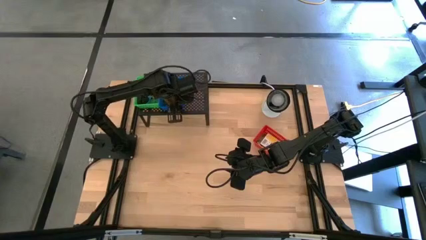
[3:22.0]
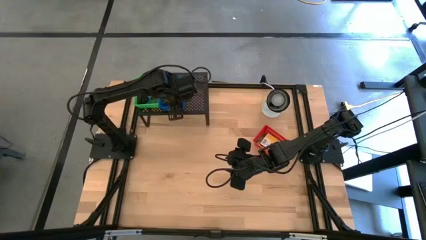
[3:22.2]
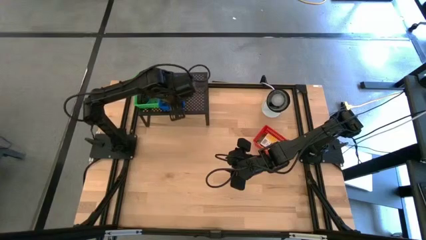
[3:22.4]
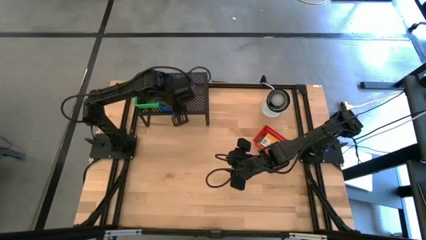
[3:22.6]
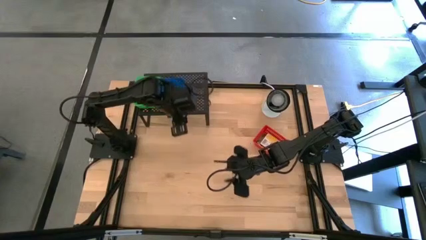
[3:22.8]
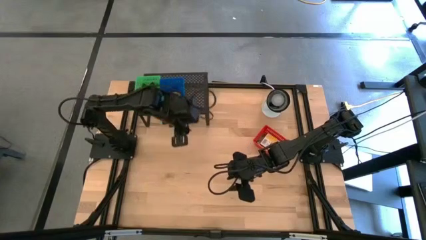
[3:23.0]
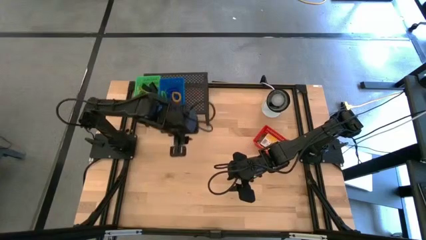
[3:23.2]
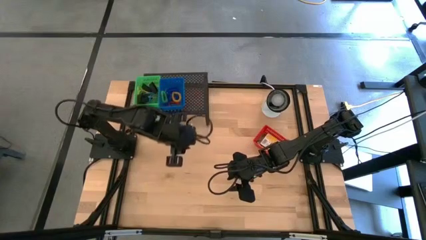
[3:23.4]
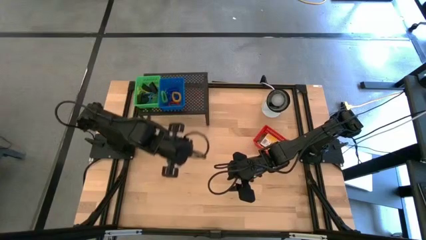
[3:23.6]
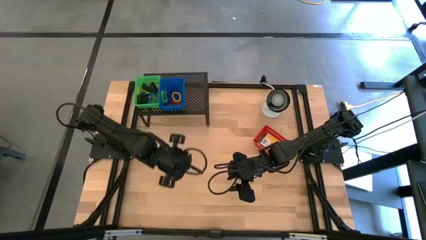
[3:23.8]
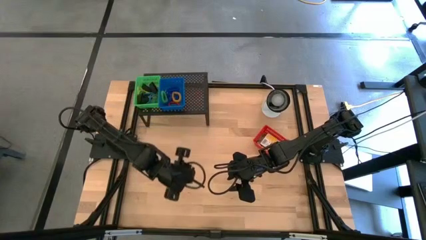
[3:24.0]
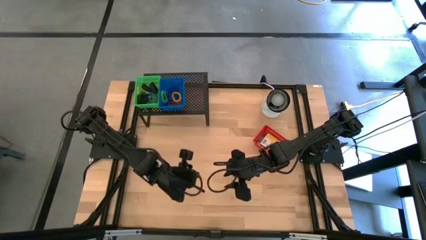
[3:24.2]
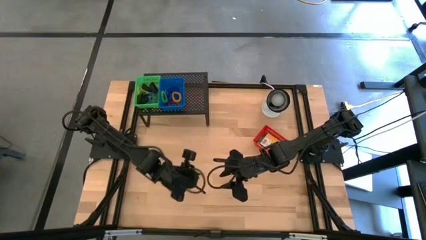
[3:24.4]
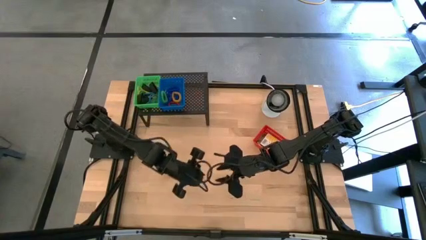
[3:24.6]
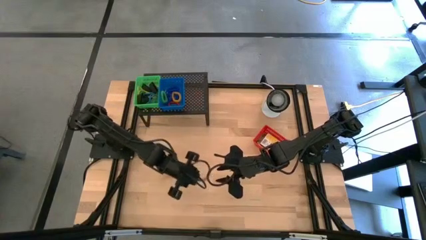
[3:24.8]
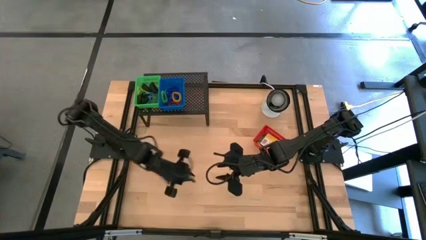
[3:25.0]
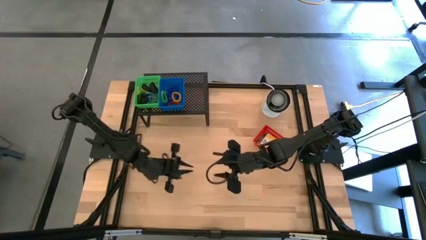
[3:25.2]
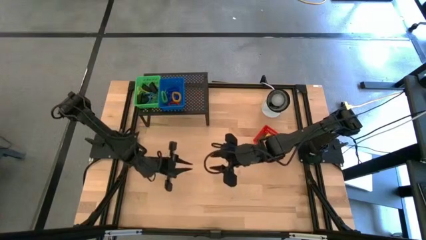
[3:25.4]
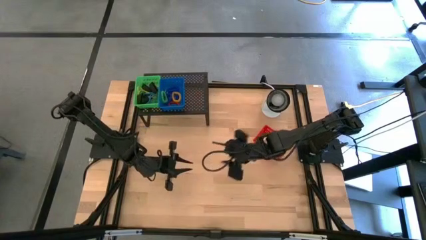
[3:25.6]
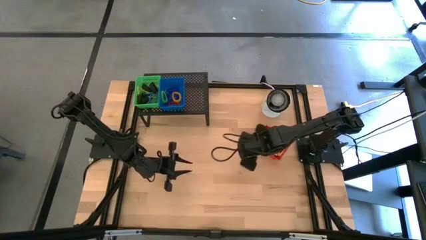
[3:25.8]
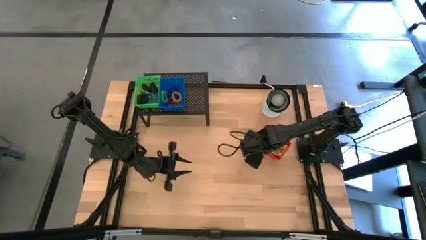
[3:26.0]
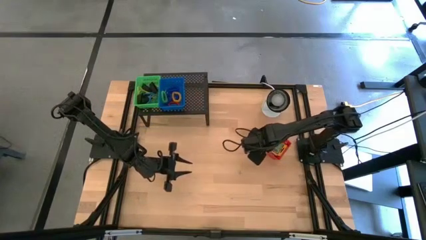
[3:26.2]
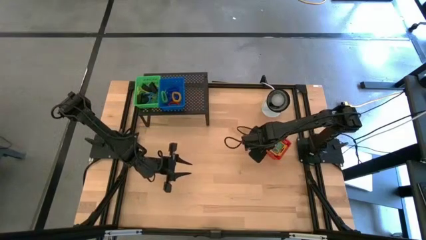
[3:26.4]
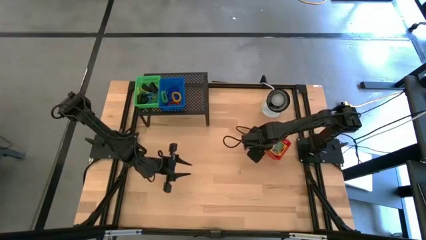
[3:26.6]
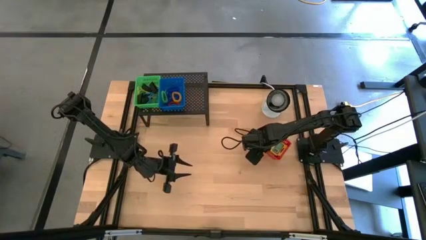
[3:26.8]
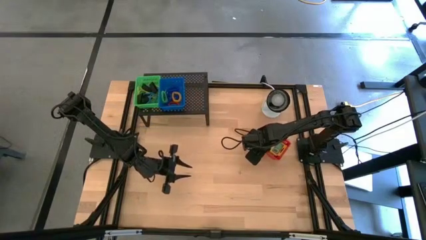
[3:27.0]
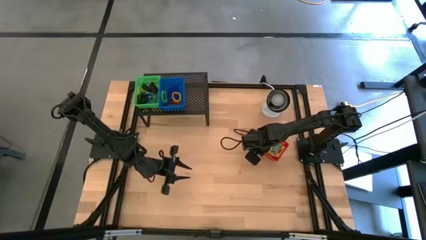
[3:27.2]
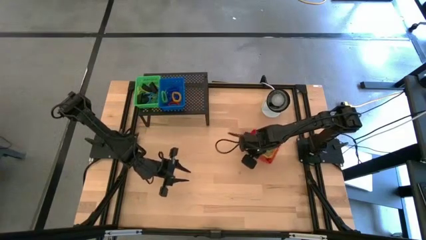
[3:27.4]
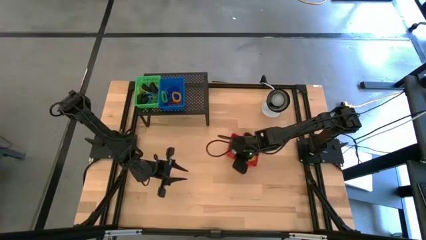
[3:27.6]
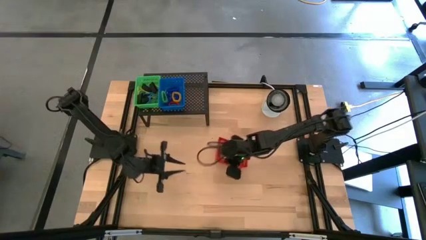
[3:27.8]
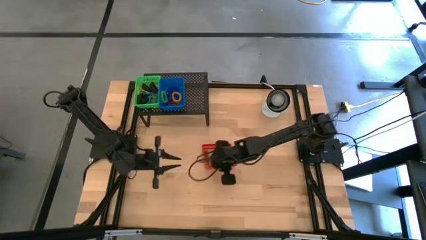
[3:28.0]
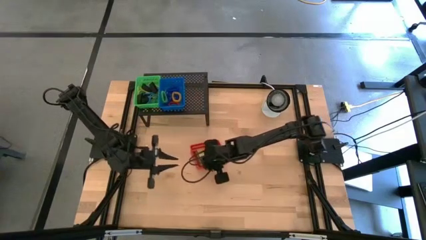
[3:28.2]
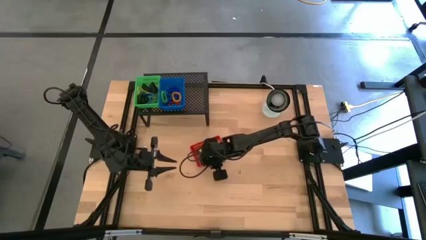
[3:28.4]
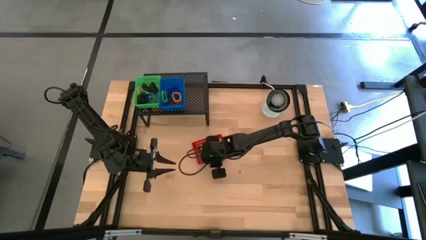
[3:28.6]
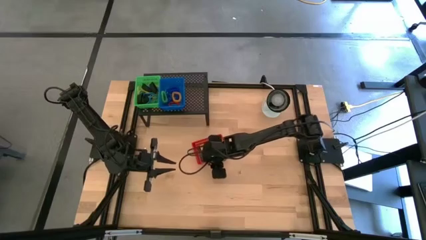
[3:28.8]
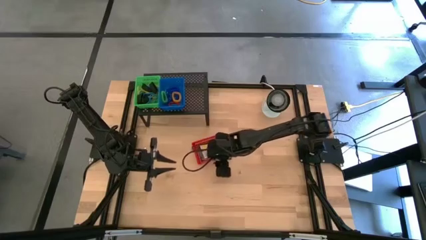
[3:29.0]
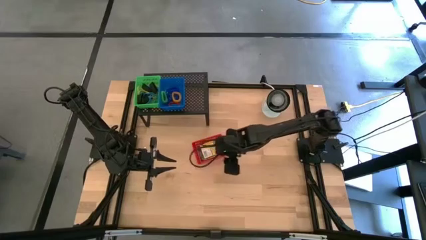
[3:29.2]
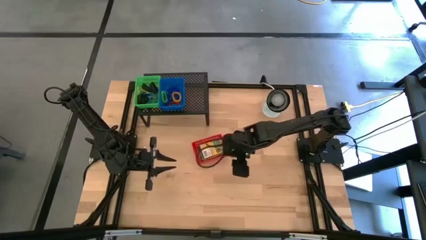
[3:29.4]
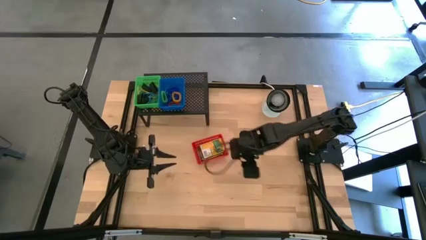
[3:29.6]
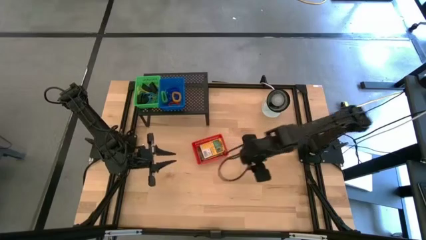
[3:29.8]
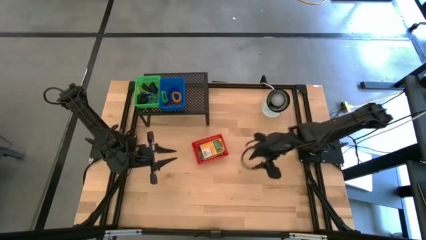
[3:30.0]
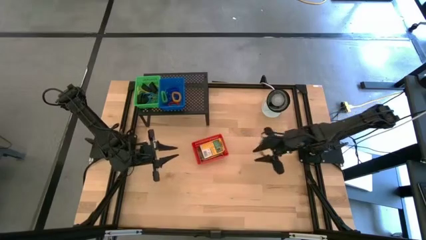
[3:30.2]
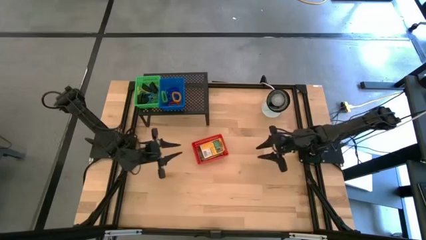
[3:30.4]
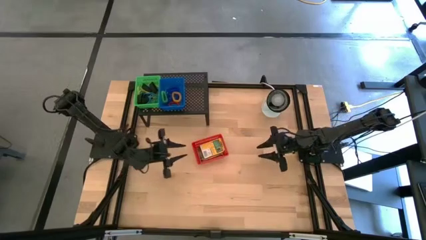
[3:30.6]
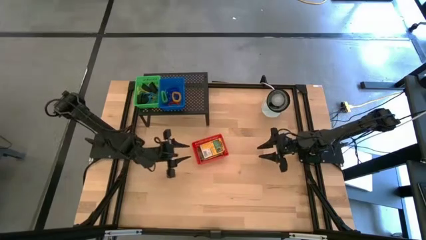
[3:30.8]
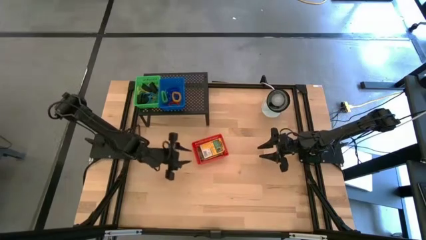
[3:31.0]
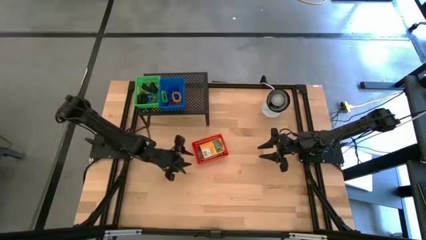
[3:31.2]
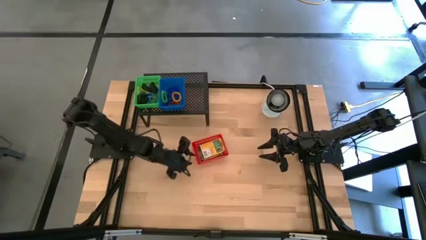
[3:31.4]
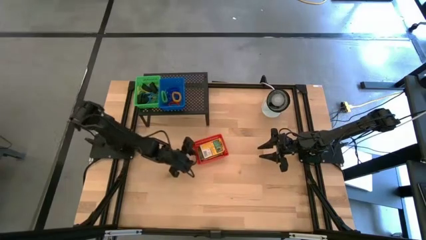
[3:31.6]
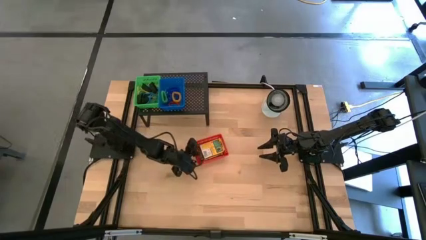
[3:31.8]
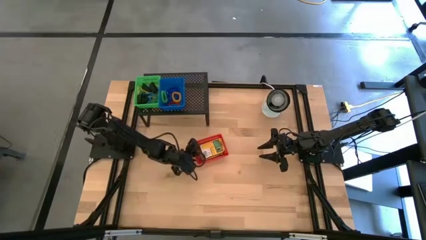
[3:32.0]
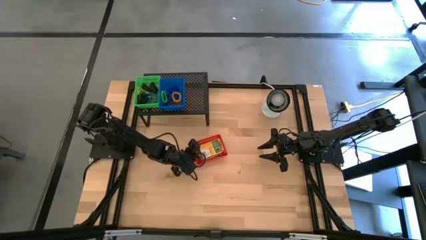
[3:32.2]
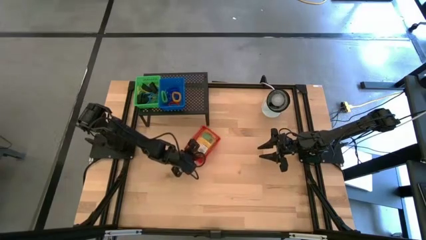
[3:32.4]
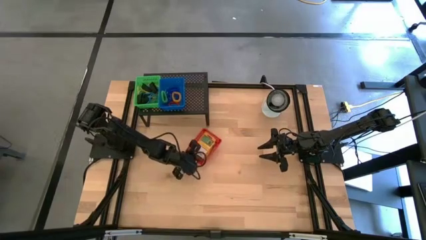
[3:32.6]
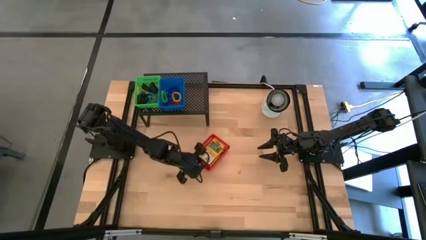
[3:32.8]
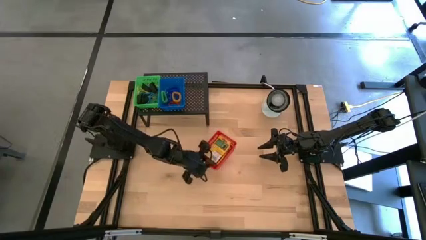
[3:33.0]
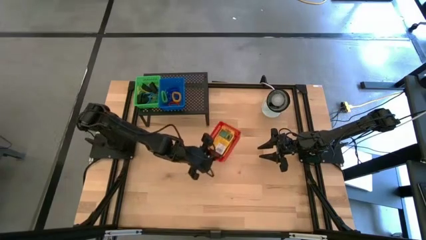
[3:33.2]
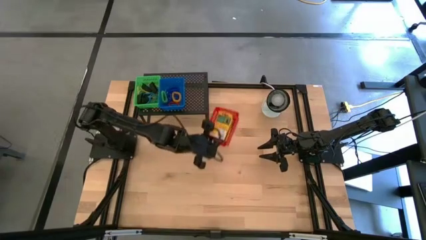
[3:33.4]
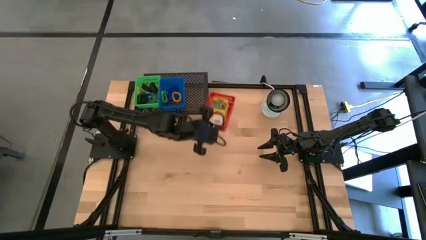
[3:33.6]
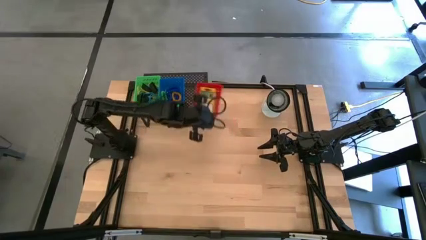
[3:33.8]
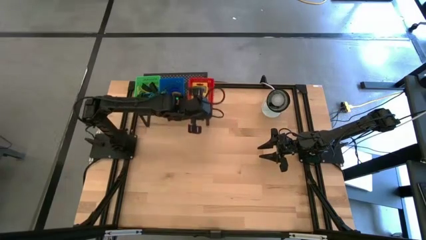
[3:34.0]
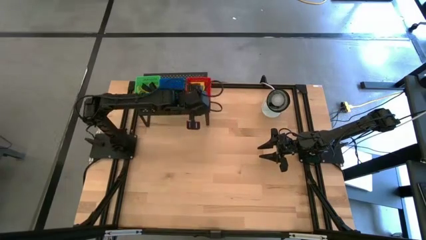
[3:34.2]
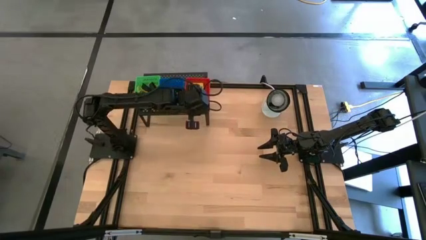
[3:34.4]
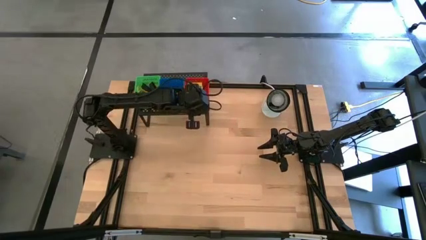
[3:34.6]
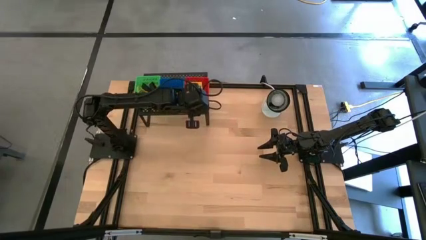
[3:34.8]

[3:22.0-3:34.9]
Task: Pick & Place Office Desk Supplies
Put the orange basket on the shelf

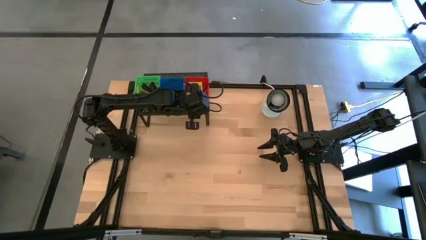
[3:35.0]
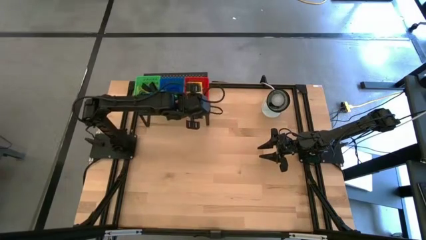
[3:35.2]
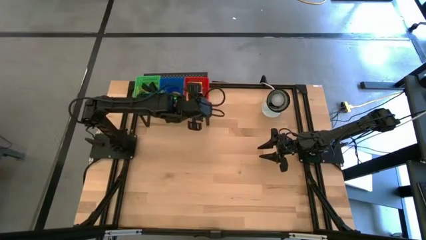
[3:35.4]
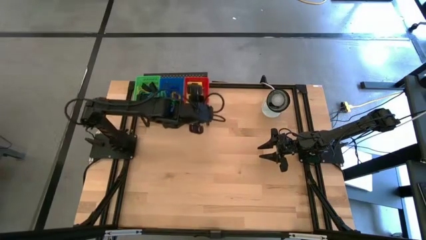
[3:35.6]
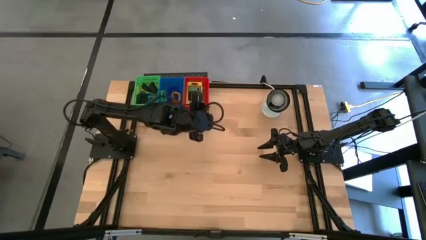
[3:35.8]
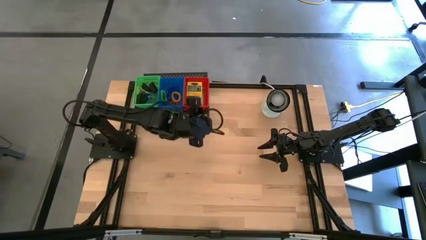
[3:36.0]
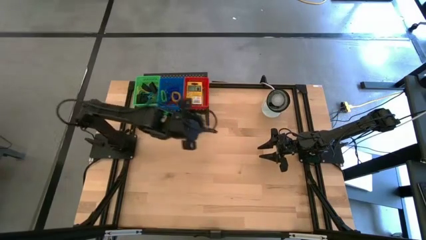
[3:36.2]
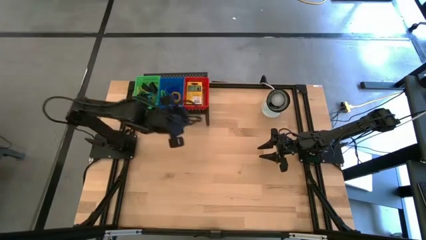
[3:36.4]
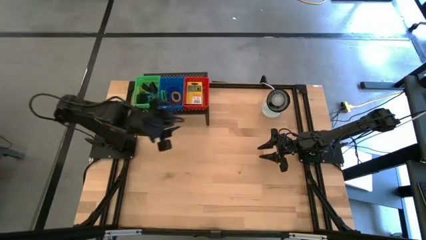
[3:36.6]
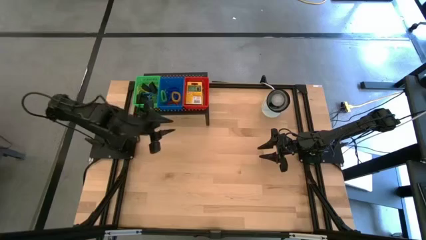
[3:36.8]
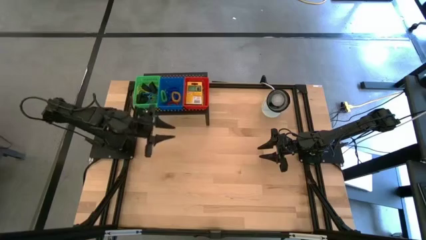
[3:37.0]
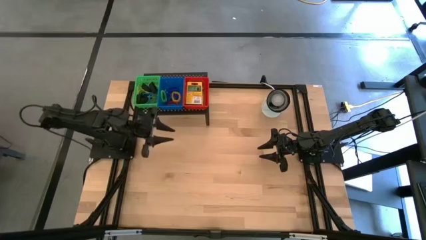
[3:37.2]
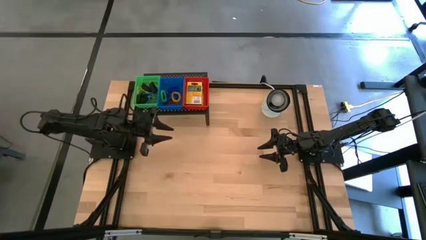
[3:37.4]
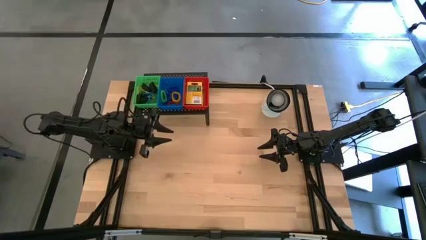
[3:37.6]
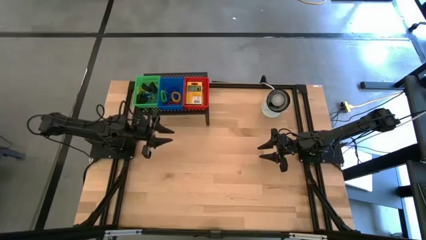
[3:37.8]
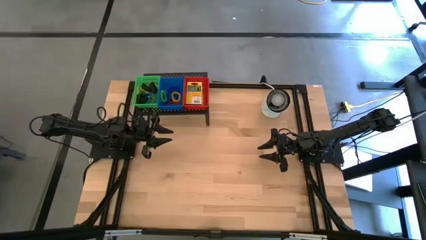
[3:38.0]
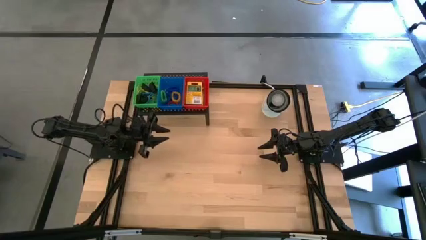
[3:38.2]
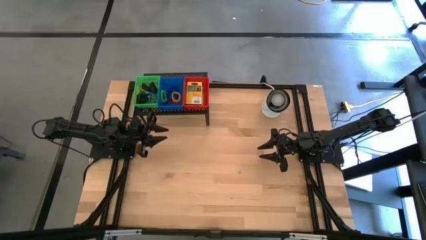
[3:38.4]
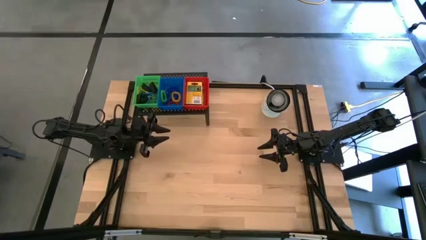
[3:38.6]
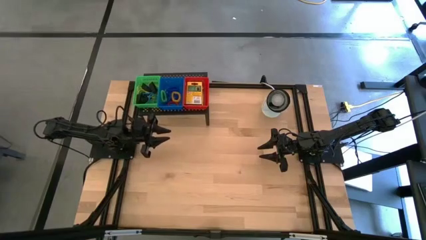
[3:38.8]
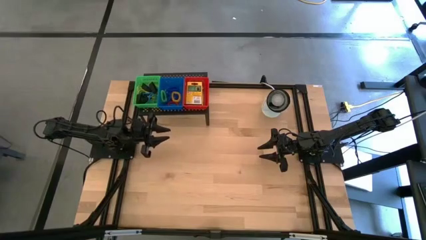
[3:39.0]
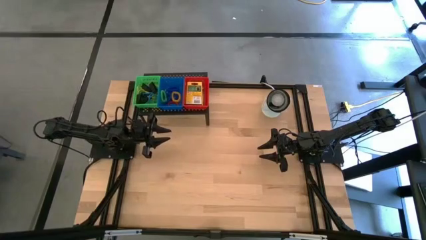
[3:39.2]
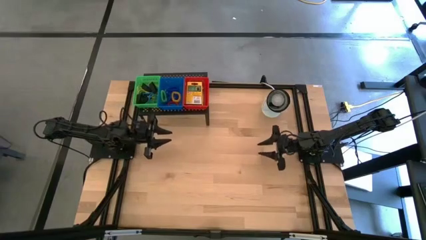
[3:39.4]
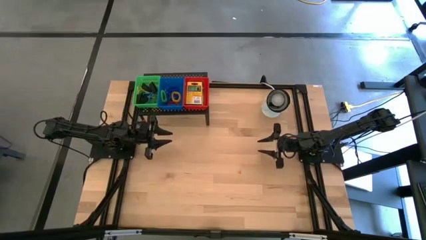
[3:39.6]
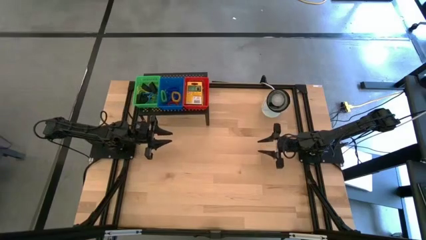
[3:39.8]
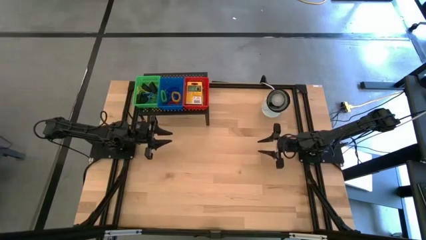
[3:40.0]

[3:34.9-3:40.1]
Return to Home Position
